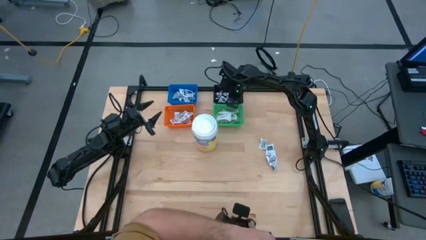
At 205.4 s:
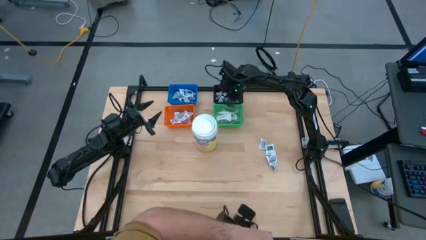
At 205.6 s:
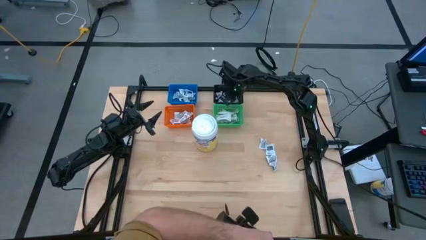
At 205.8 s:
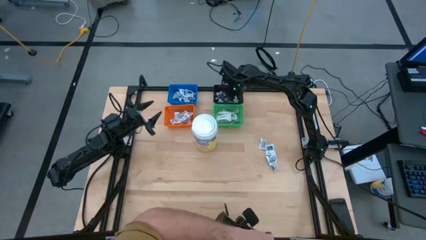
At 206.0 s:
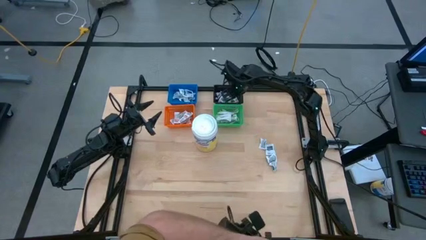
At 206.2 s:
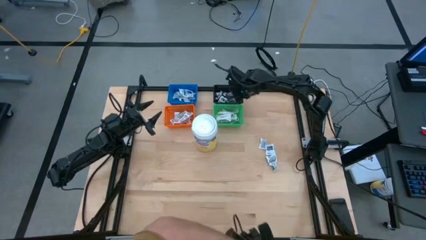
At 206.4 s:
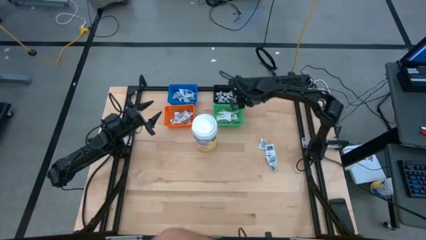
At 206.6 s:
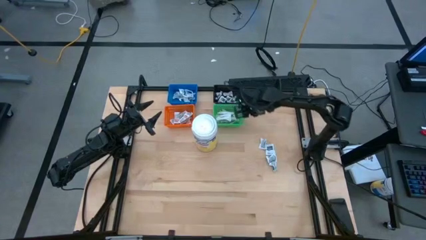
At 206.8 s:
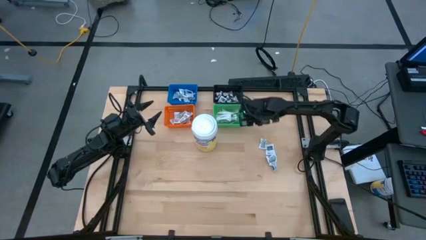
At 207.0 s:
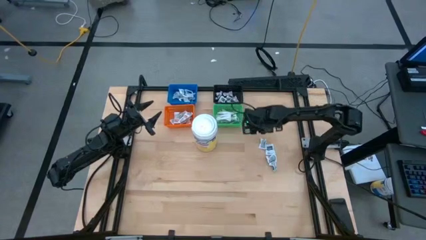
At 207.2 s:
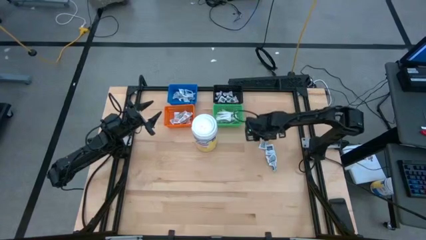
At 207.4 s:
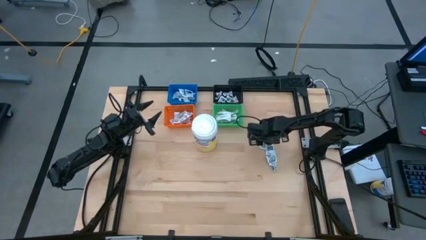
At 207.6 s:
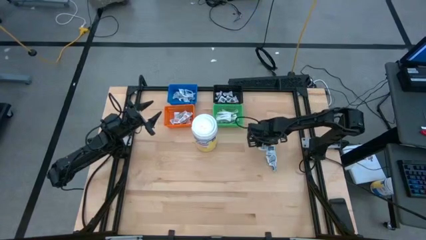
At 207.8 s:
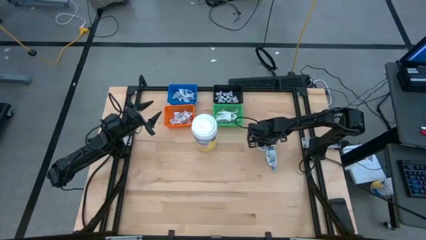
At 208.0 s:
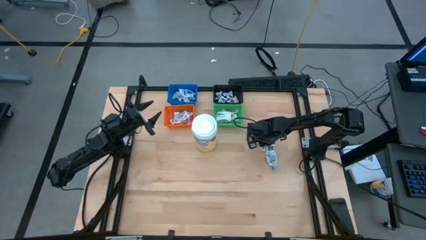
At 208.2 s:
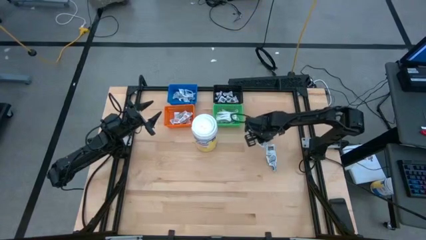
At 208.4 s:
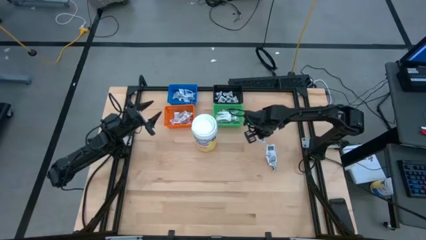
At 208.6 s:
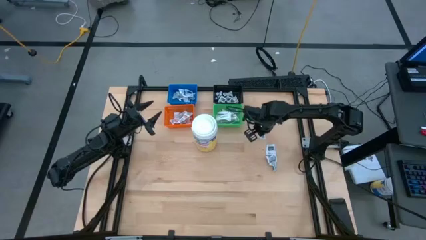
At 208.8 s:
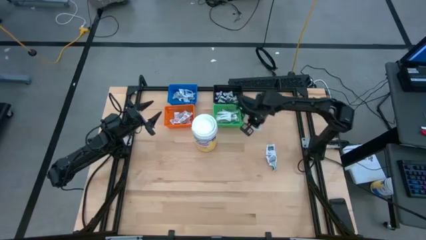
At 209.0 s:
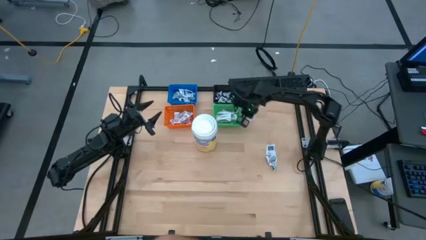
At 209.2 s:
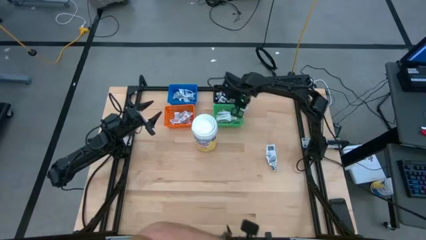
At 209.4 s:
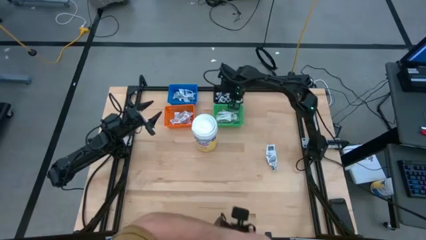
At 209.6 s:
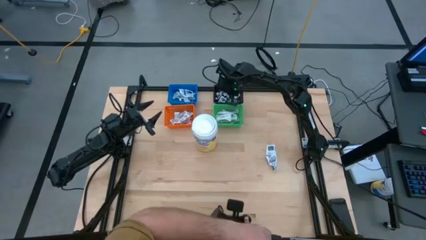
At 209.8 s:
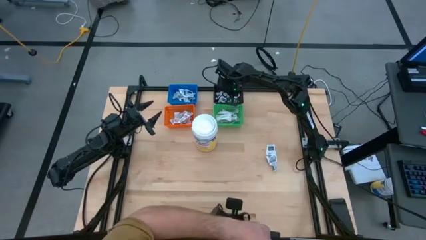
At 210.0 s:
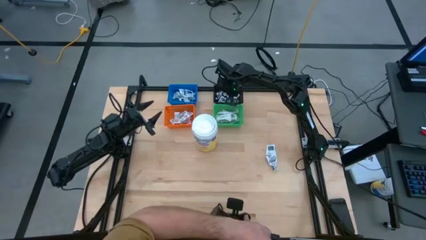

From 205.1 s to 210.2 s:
Task: Pick & Place First Aid Supplies
Put the black towelette pack into the black bin

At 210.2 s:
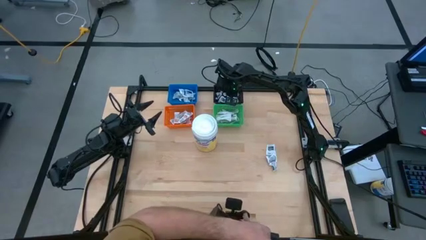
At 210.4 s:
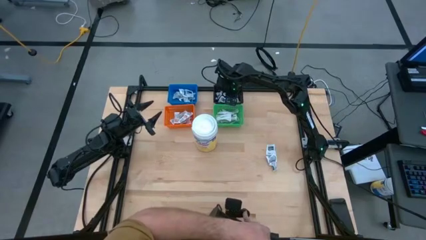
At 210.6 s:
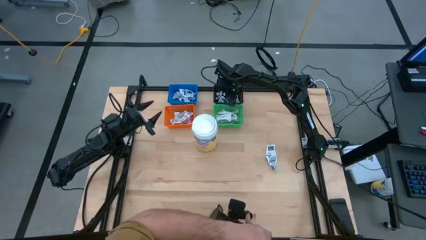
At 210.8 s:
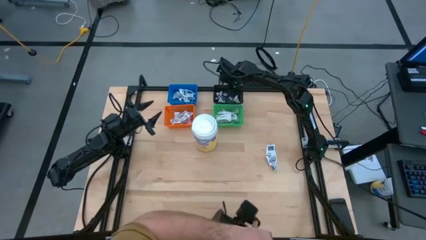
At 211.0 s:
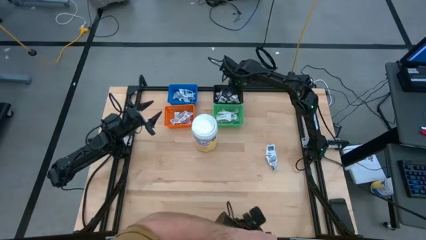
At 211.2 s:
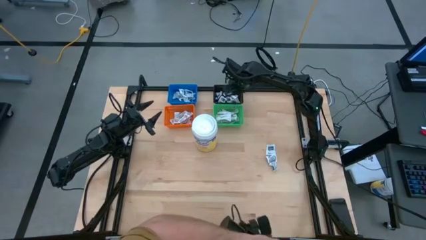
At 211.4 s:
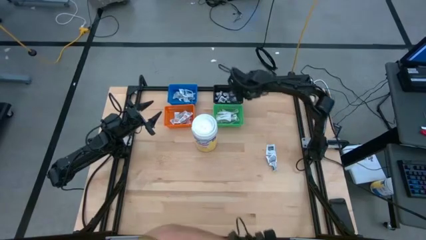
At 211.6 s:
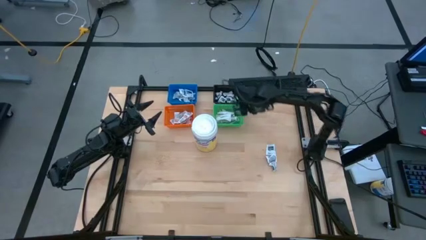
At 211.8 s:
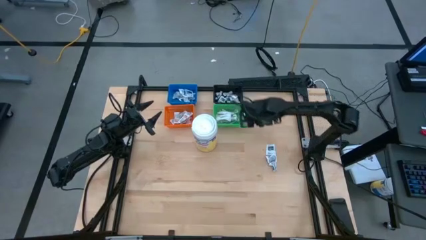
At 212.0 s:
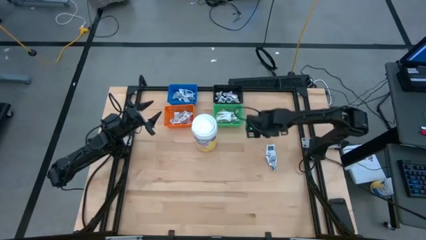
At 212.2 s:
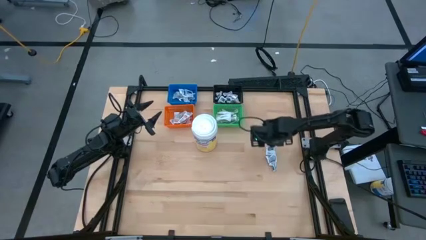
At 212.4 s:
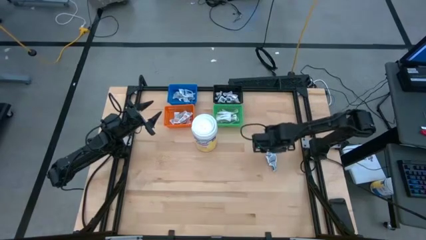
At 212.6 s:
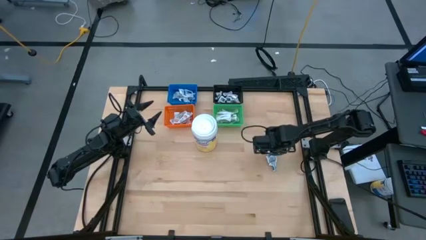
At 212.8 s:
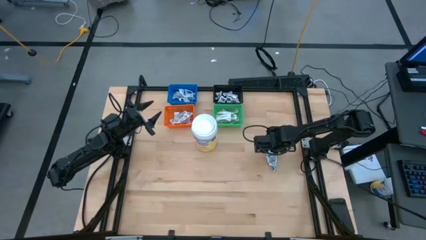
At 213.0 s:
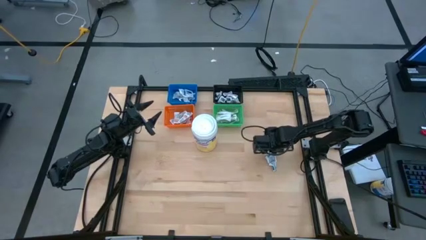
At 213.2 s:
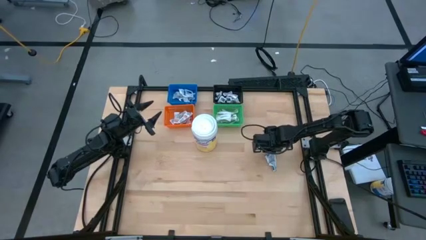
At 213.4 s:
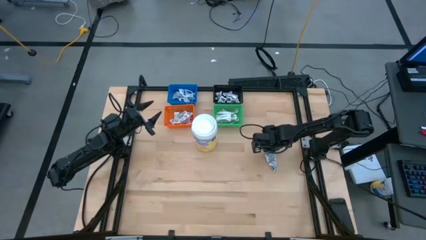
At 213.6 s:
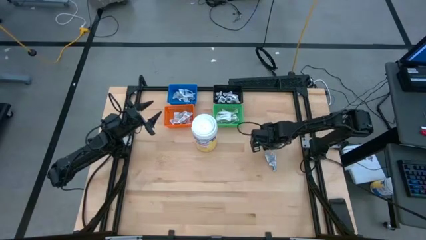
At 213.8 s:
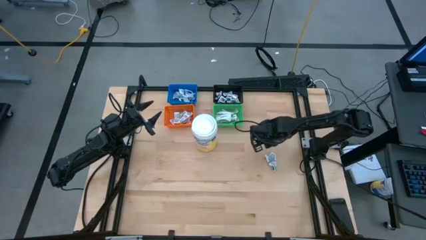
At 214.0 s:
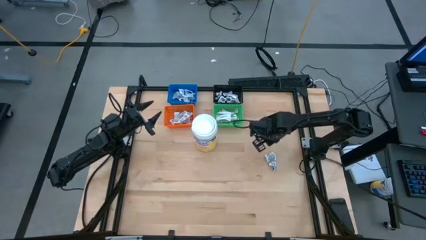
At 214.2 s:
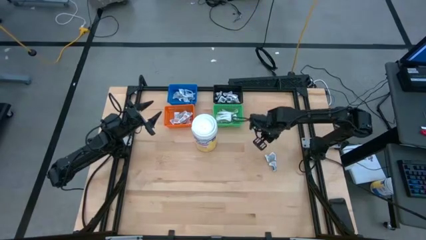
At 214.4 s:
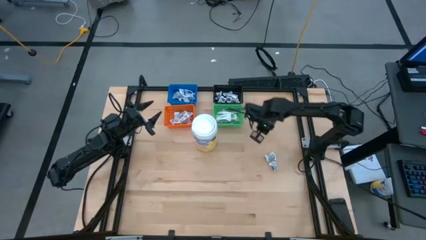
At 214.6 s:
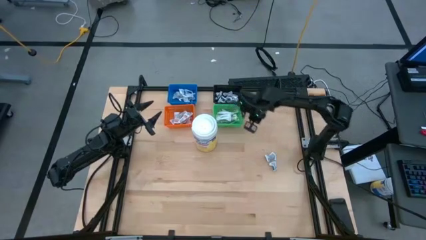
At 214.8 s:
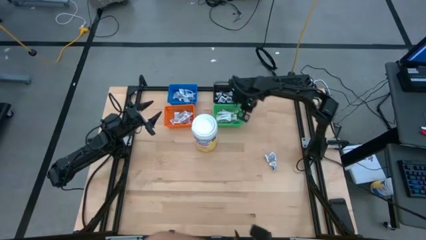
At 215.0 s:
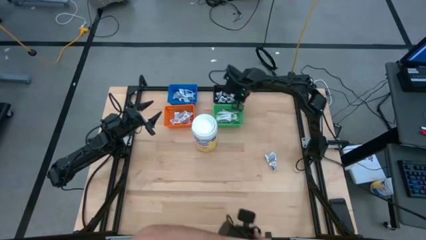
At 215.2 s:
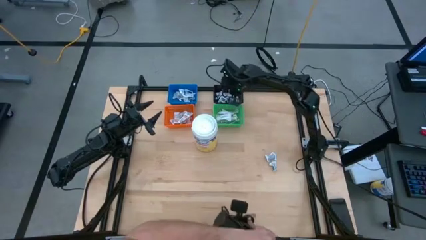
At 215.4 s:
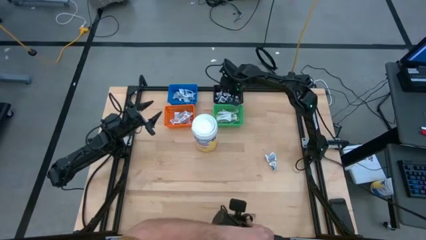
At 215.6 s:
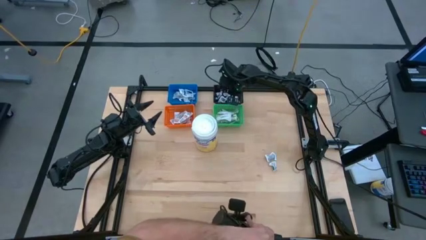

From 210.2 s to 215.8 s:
Put the black towelette pack into the black bin

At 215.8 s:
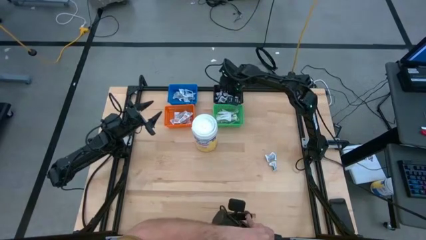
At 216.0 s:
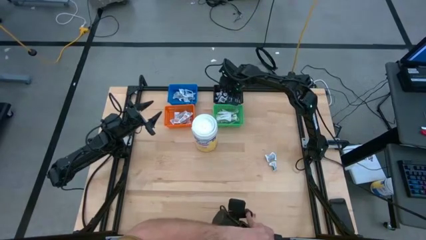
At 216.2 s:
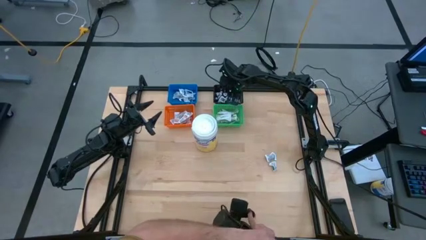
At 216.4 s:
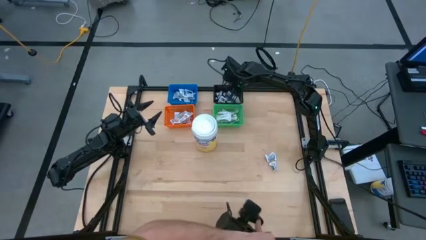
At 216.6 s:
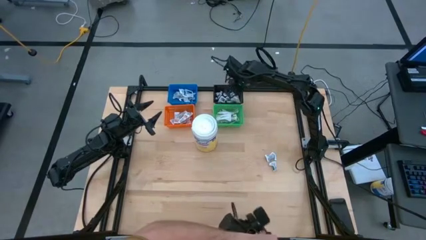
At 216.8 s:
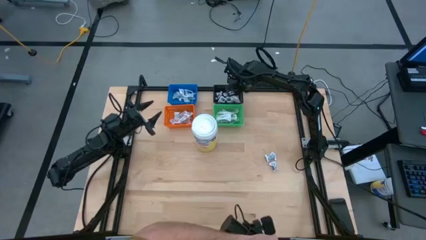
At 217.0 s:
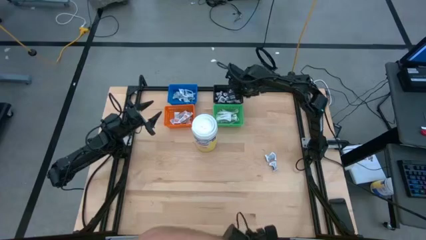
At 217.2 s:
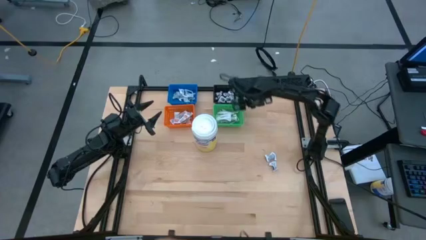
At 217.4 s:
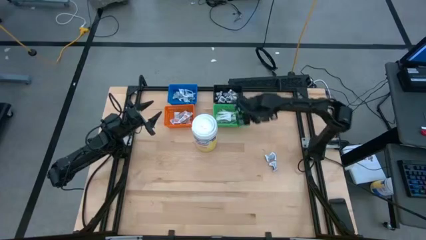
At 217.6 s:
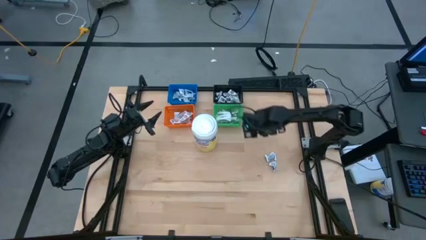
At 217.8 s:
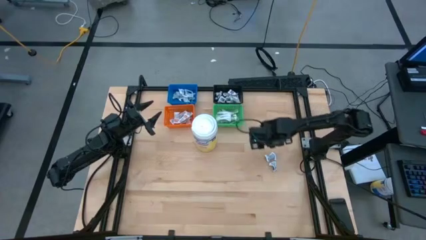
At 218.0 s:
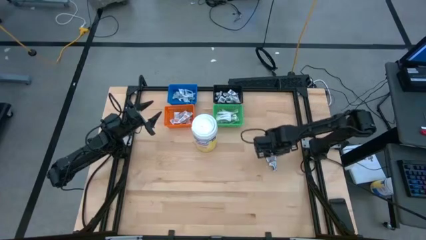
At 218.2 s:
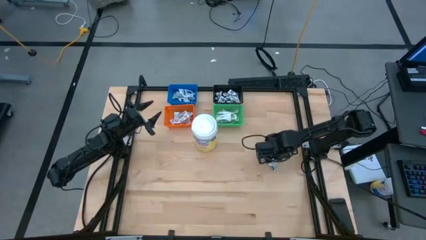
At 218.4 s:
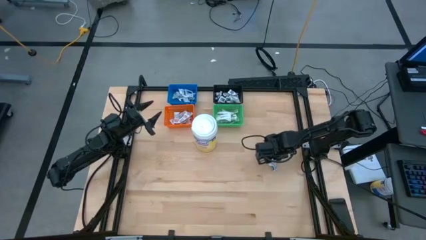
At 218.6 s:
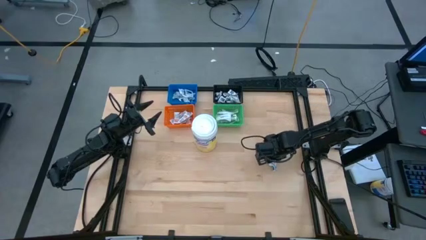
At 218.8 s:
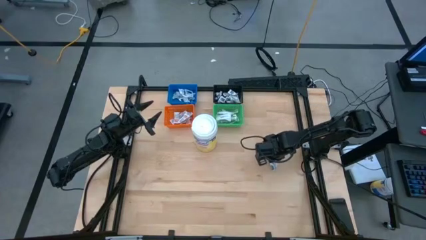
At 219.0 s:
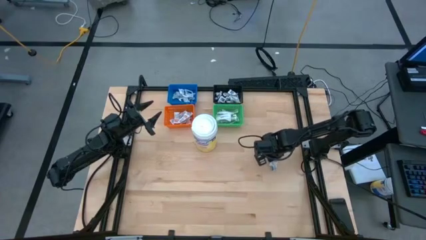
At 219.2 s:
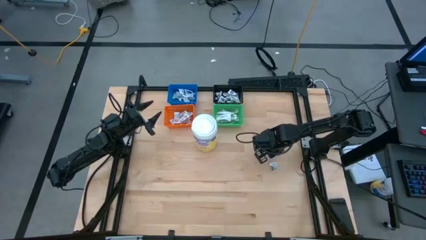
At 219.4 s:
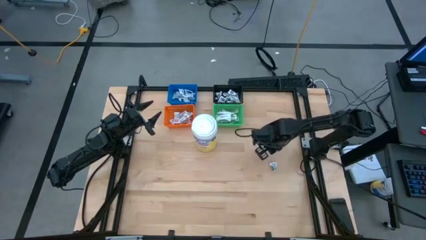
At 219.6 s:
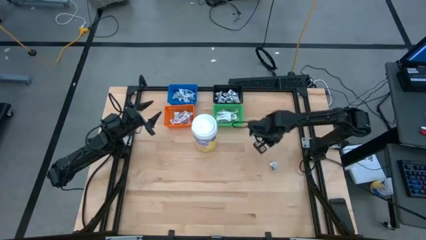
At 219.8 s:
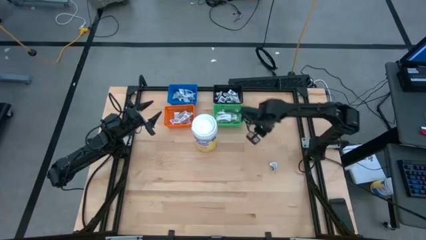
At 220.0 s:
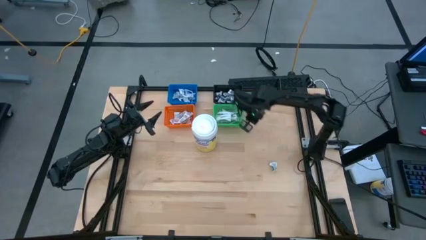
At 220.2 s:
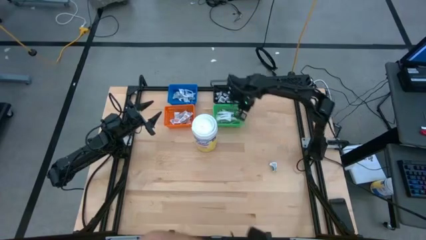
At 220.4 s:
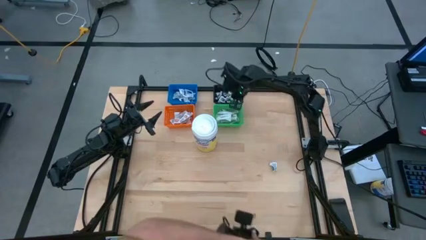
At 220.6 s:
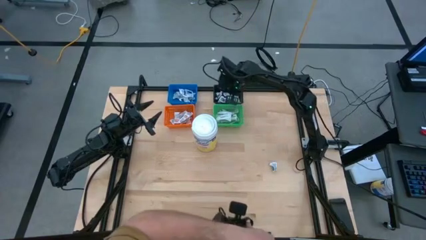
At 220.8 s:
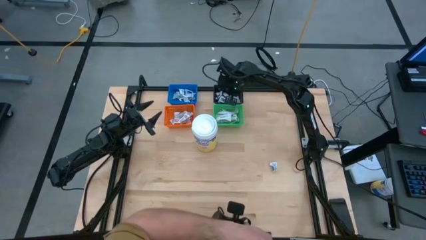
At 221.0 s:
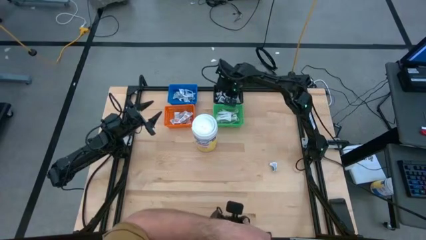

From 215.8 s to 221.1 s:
Put the black towelette pack into the black bin
